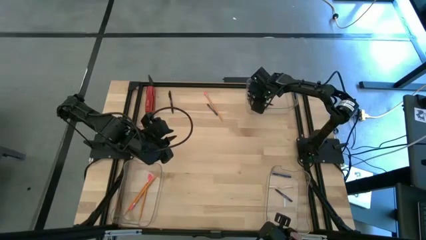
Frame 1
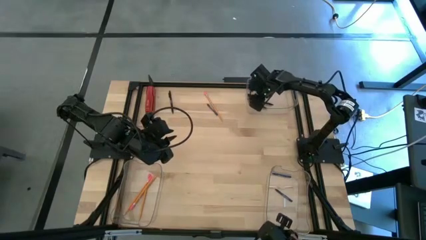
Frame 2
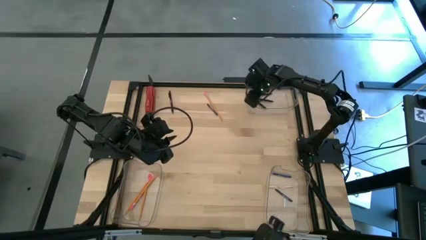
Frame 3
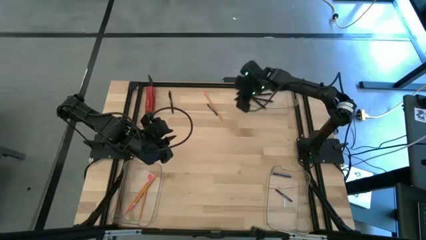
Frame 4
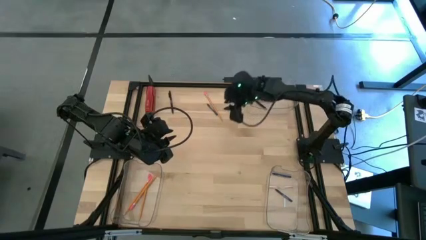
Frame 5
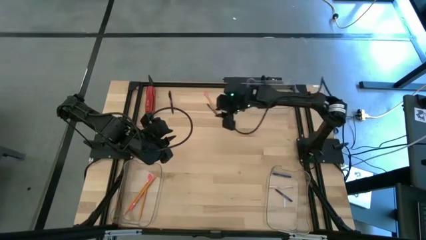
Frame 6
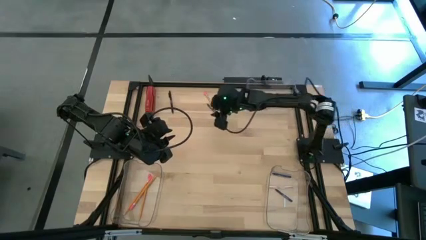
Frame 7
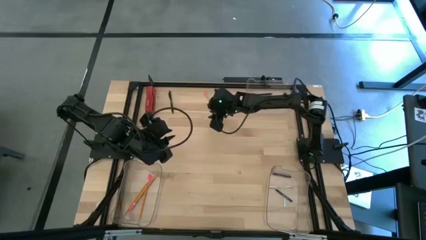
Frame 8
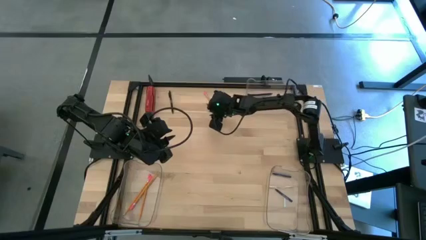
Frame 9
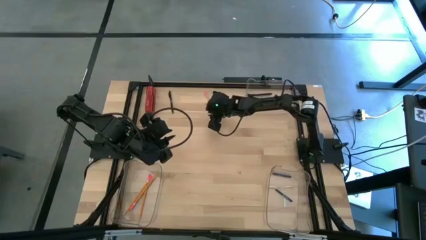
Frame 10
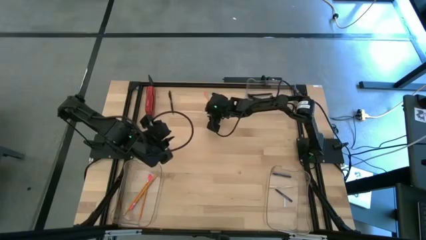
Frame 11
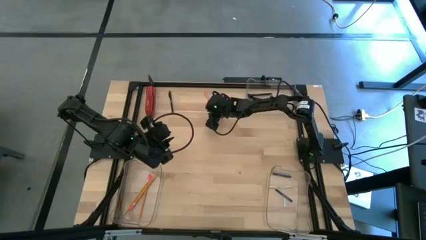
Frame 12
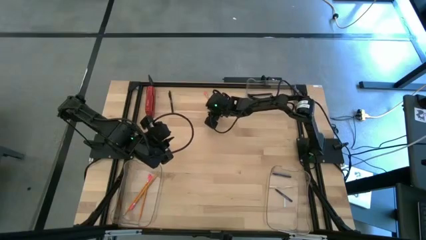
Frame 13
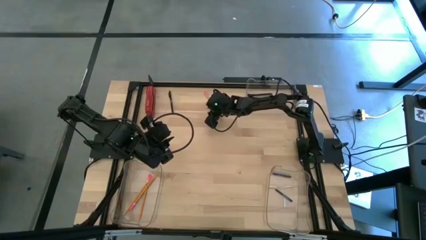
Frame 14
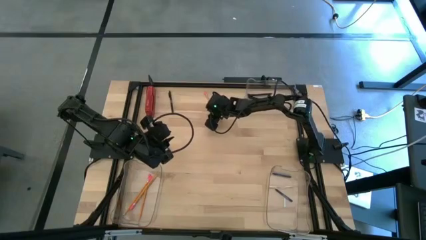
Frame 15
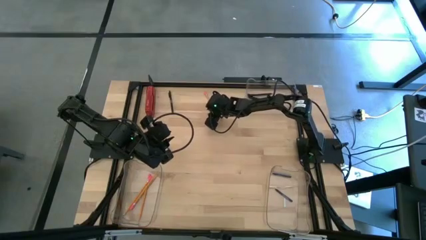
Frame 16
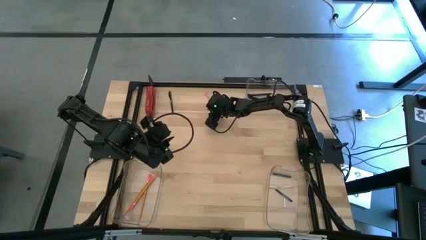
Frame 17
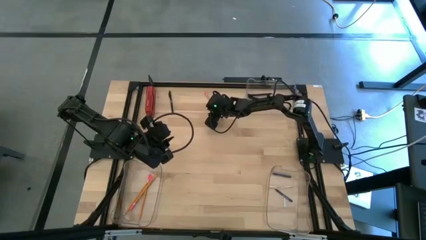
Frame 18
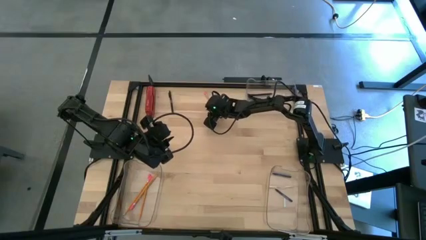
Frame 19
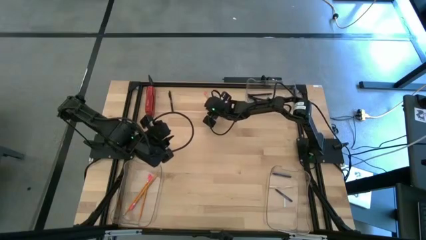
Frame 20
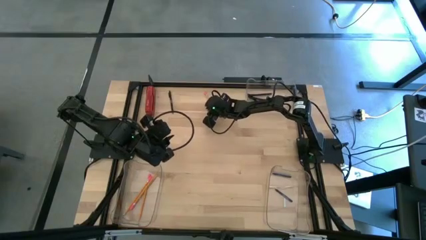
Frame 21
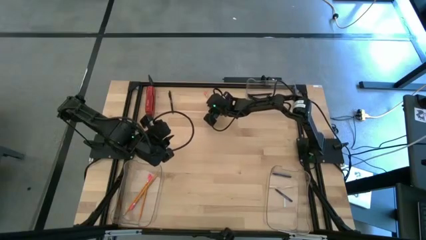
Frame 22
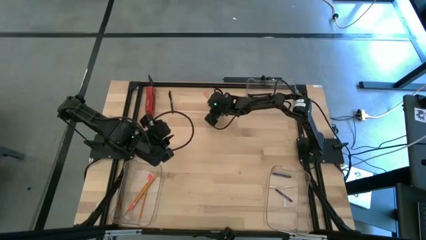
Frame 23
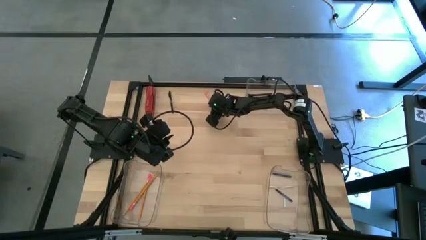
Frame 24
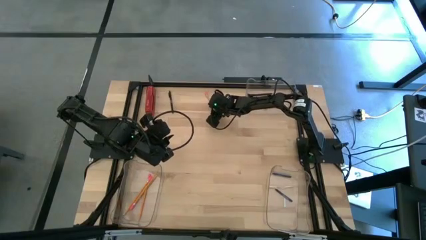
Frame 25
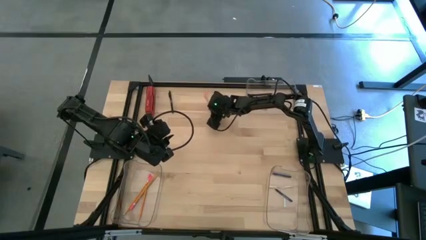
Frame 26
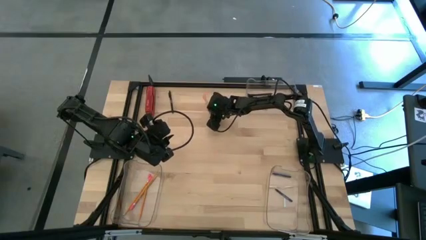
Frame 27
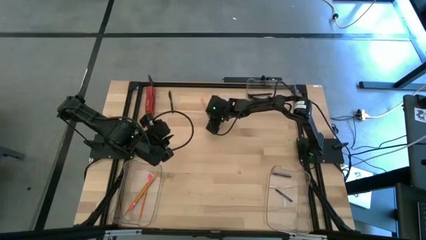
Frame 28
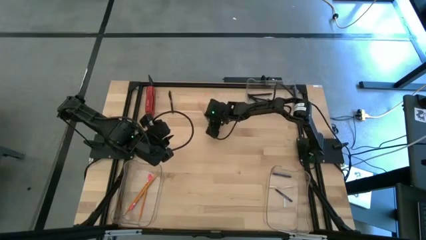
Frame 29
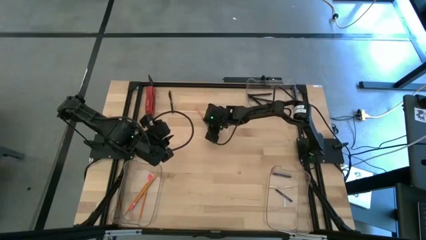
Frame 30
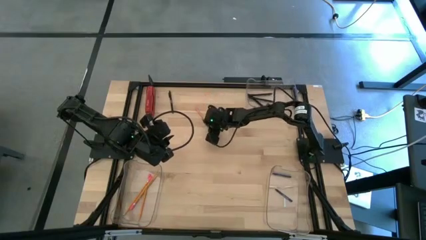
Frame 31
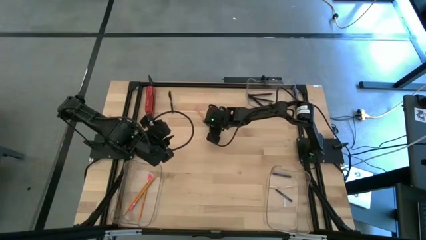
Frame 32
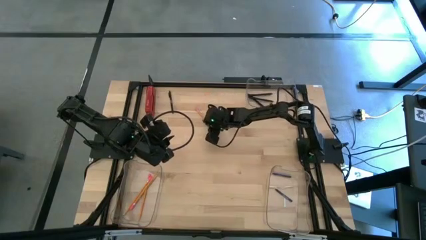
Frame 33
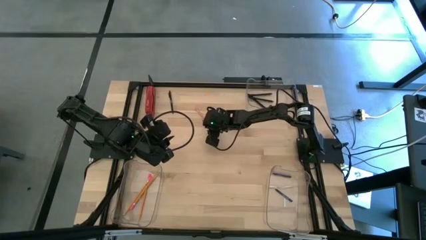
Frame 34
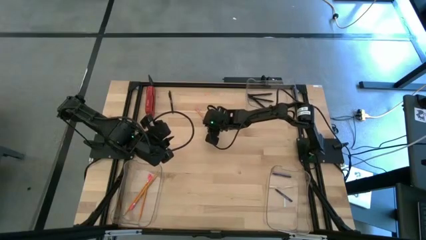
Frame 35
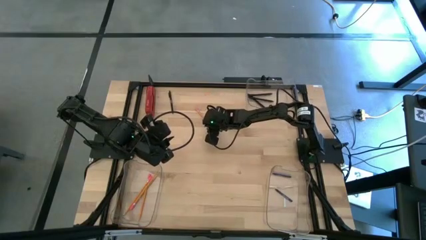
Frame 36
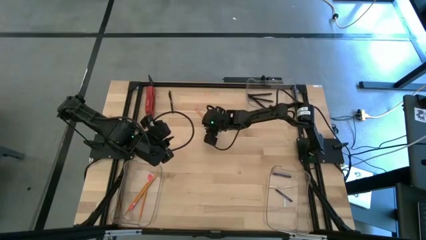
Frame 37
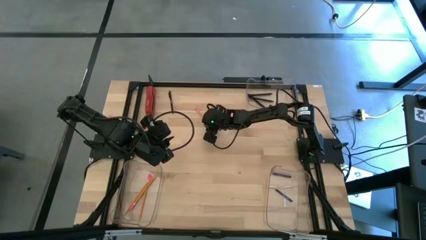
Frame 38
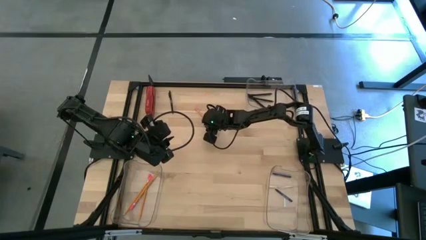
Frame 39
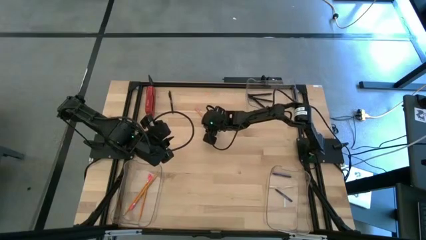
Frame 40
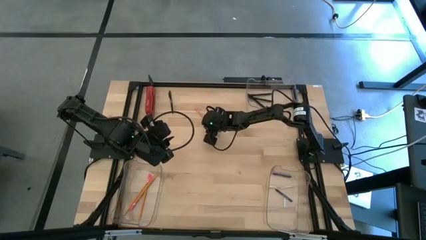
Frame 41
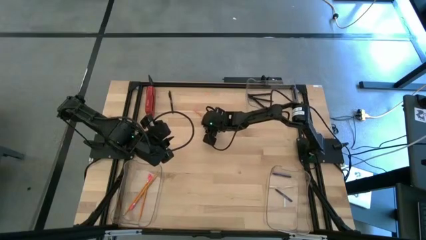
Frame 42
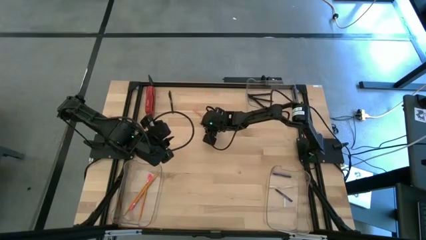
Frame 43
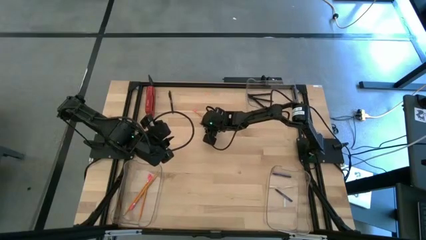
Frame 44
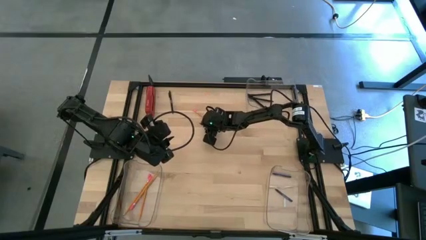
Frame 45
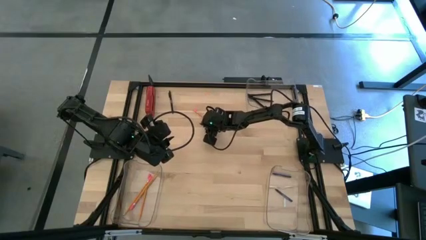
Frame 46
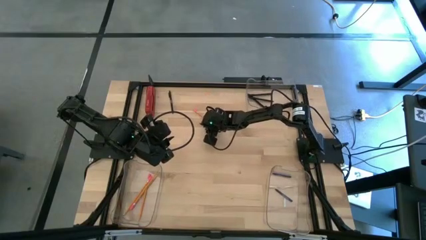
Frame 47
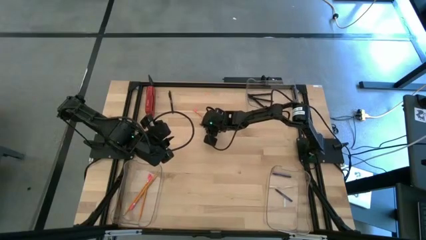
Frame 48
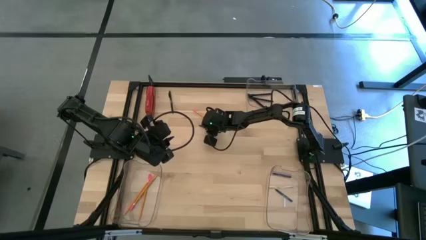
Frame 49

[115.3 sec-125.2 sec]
Task: Sort crayons/erasers/pens/pencils in bins
Put the blue crayon into the bottom right transparent bin
